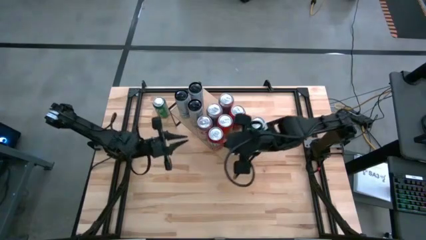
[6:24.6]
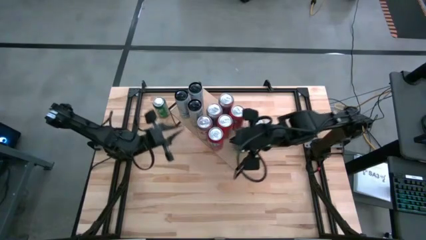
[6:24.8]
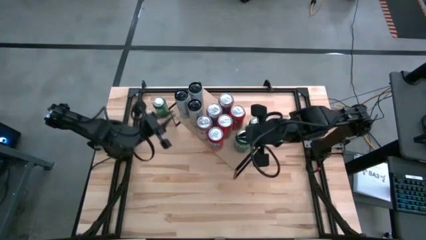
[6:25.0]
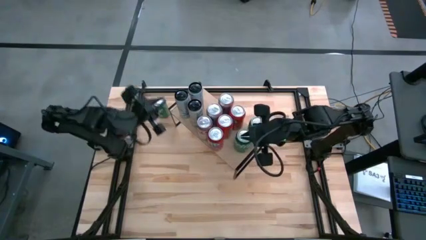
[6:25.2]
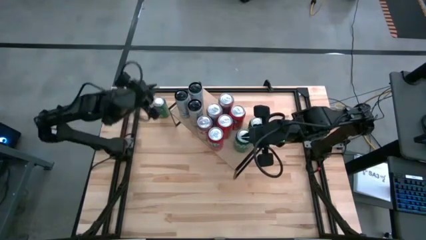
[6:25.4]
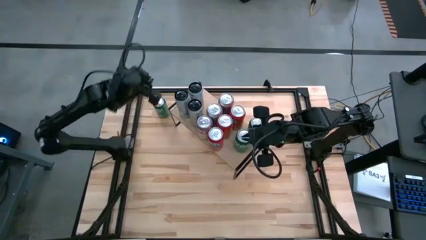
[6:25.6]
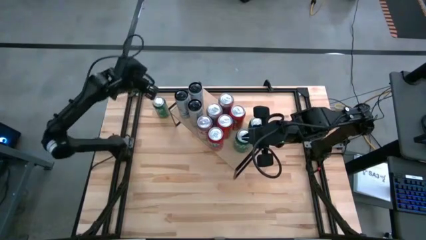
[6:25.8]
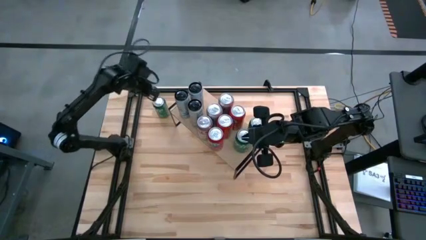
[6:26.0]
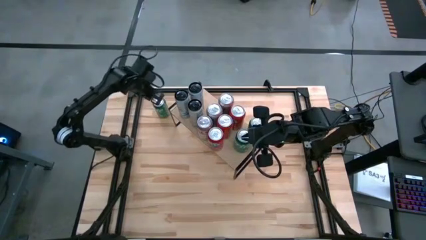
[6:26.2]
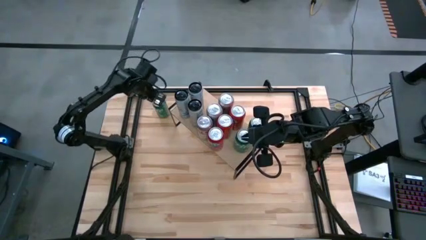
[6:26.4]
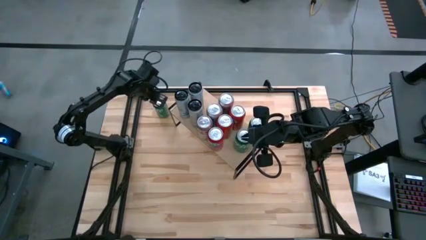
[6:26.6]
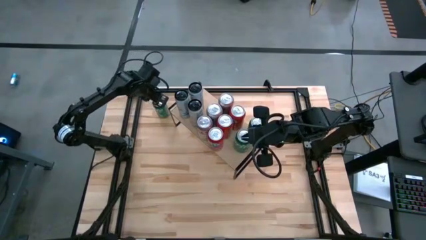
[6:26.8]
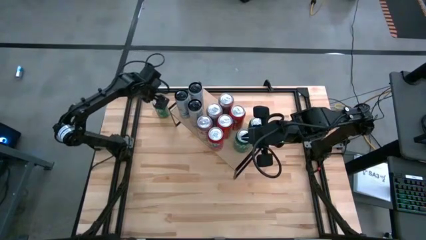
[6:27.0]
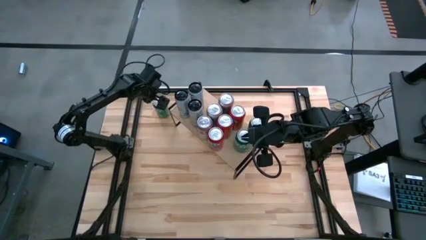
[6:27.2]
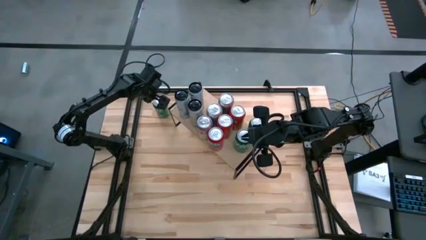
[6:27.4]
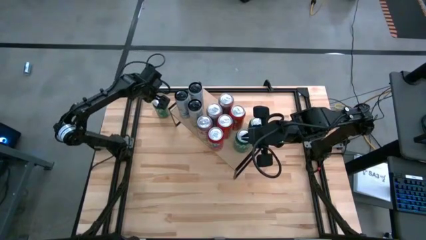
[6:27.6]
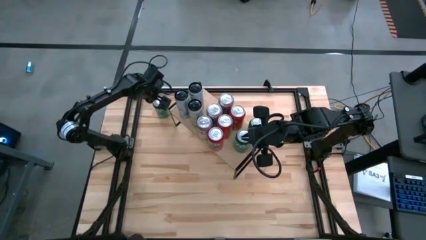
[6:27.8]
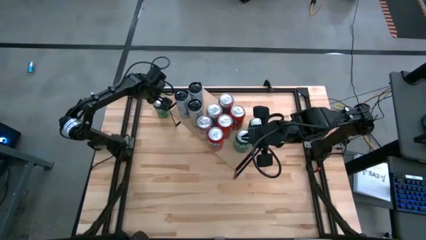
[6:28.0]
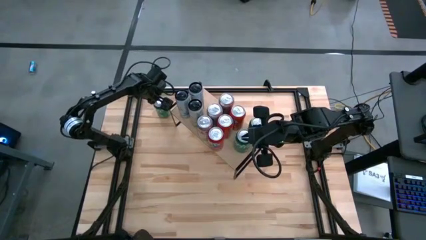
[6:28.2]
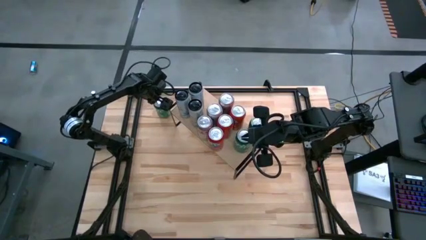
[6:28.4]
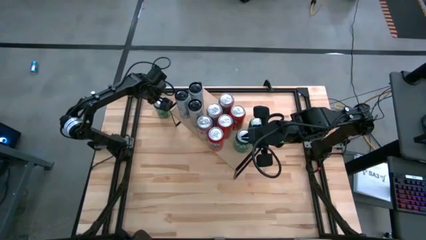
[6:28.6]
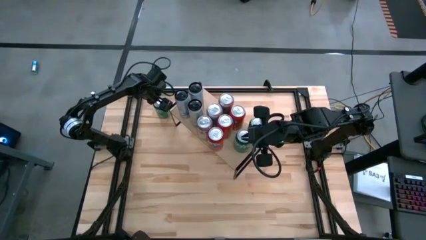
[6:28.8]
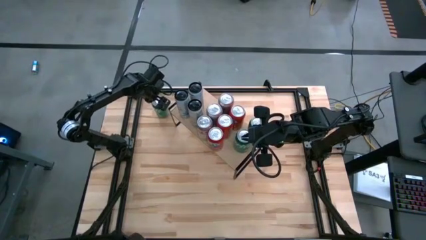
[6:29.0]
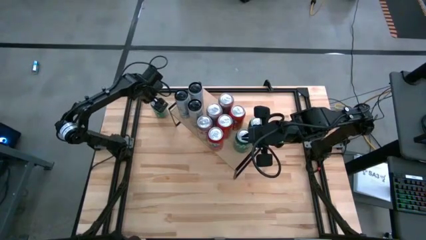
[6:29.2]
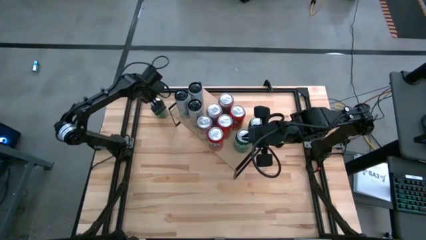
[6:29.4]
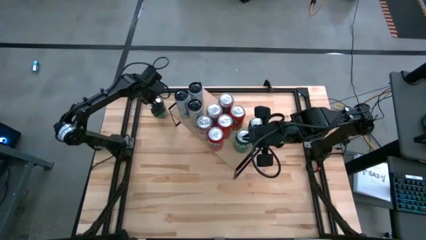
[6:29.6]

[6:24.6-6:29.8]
Task: Place canned beverage on shelf
Move the green soda can to the center of the table

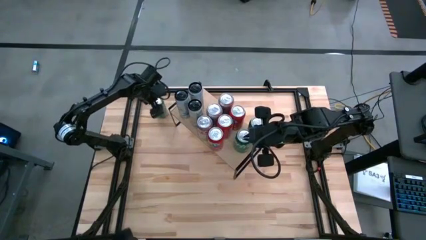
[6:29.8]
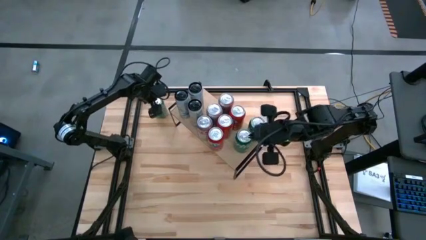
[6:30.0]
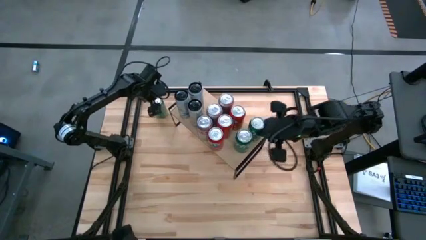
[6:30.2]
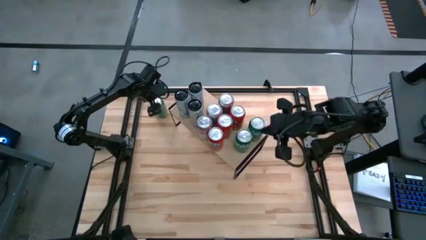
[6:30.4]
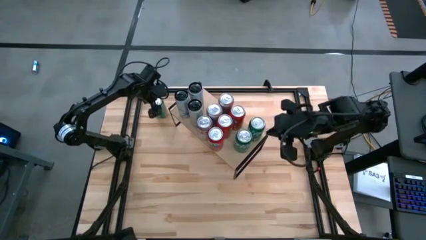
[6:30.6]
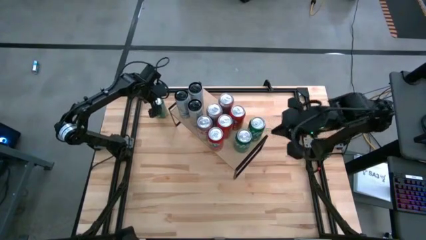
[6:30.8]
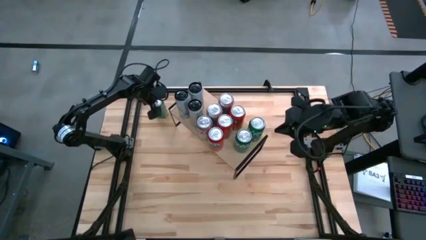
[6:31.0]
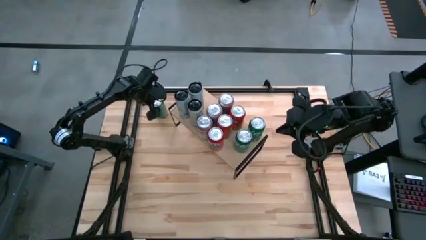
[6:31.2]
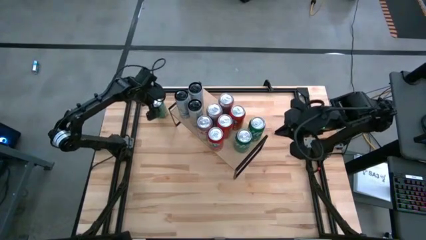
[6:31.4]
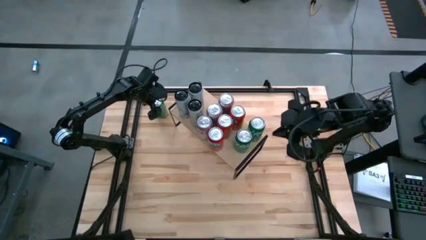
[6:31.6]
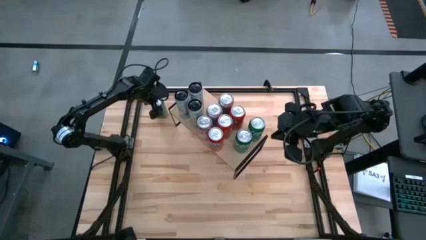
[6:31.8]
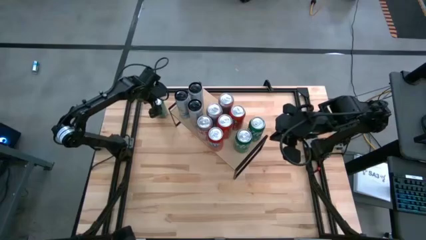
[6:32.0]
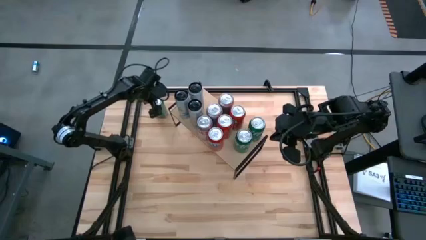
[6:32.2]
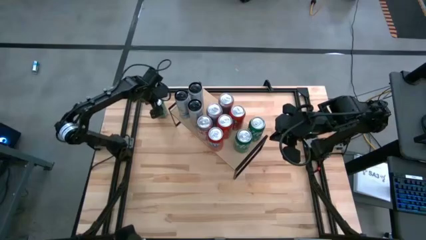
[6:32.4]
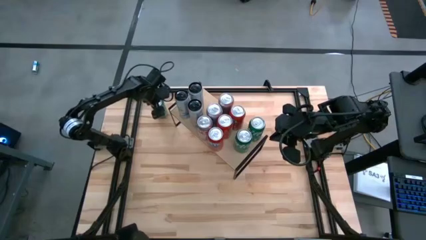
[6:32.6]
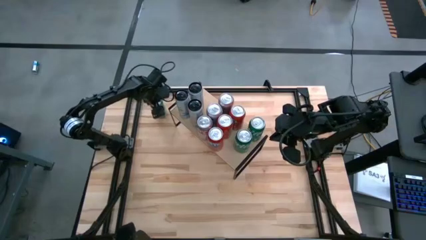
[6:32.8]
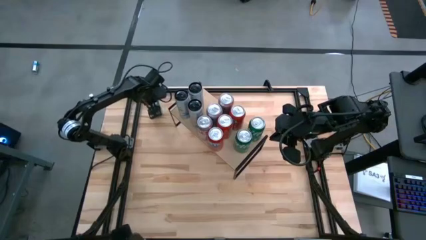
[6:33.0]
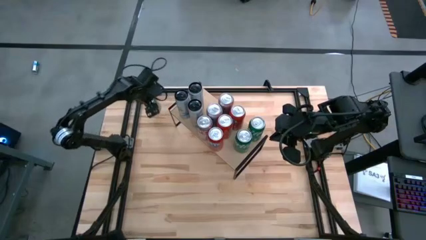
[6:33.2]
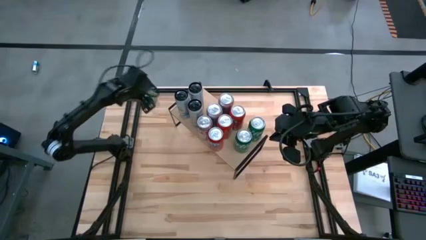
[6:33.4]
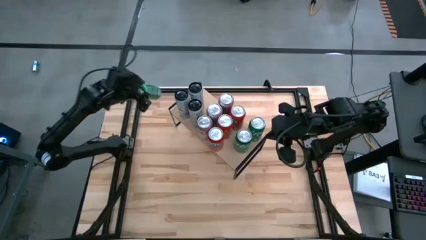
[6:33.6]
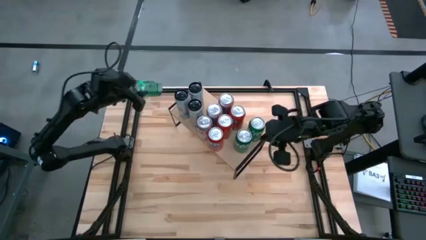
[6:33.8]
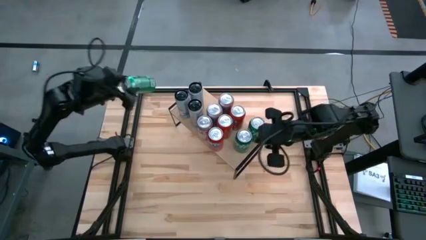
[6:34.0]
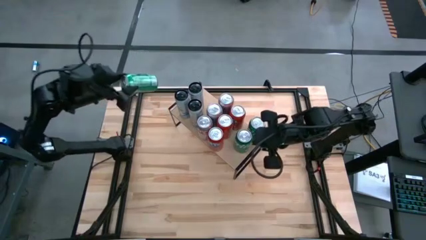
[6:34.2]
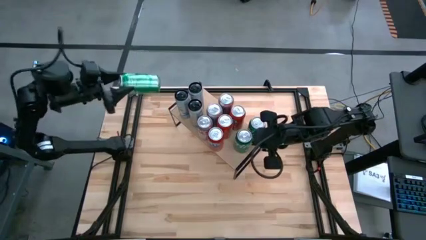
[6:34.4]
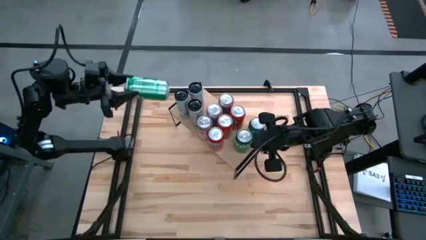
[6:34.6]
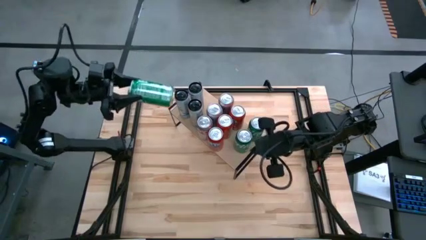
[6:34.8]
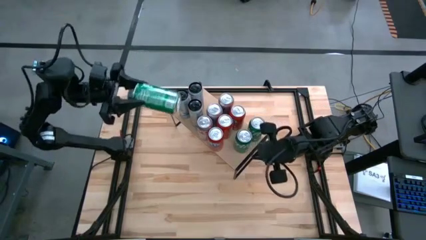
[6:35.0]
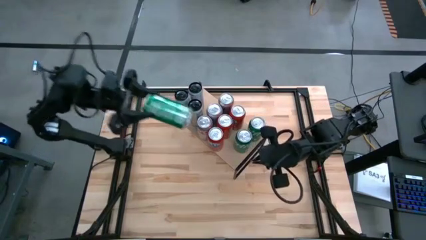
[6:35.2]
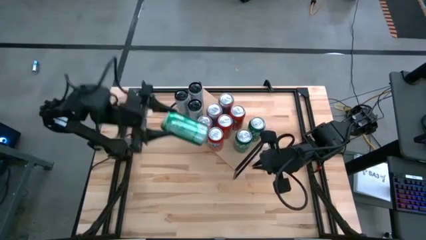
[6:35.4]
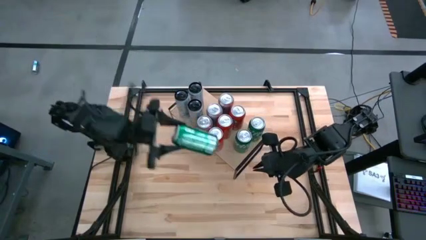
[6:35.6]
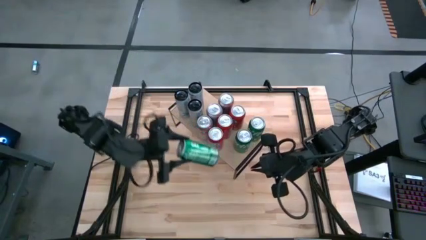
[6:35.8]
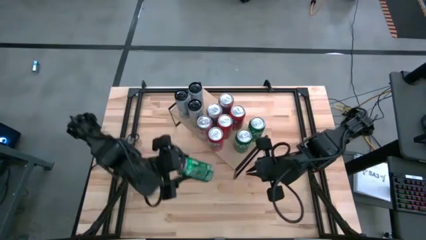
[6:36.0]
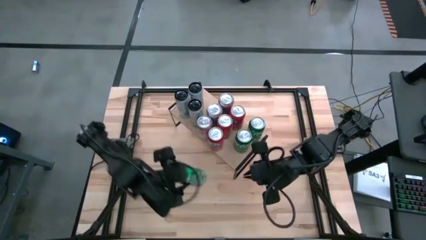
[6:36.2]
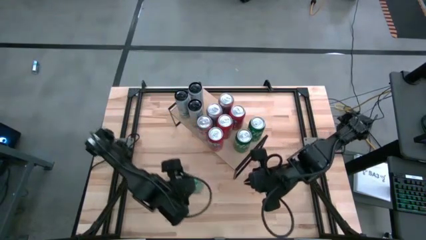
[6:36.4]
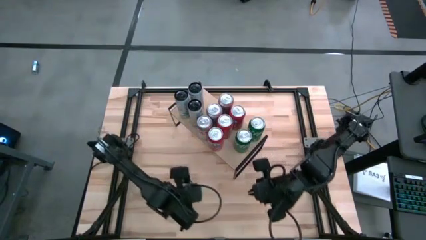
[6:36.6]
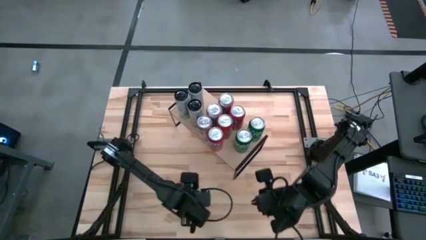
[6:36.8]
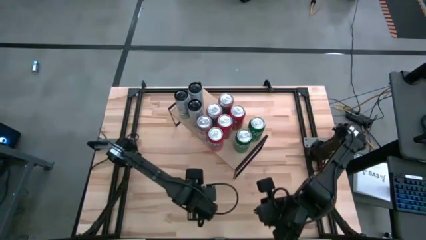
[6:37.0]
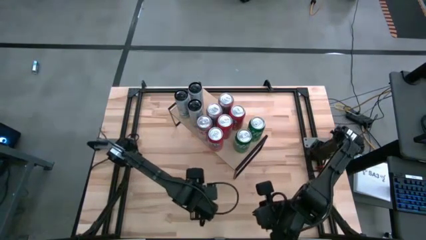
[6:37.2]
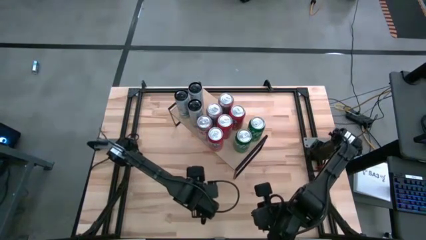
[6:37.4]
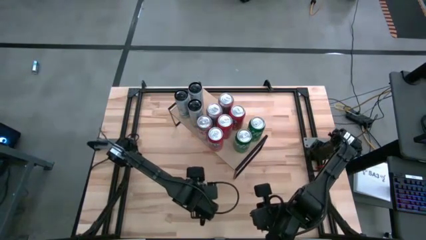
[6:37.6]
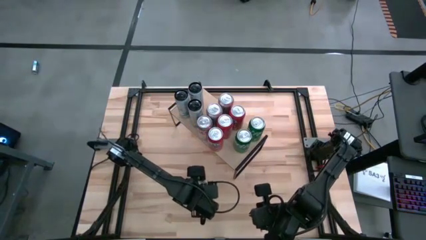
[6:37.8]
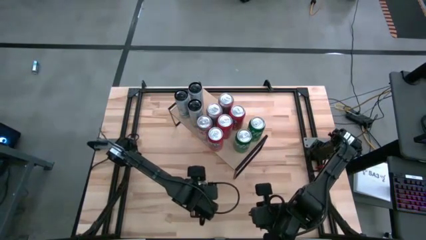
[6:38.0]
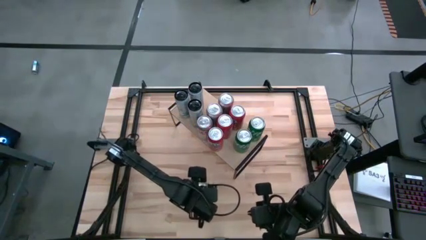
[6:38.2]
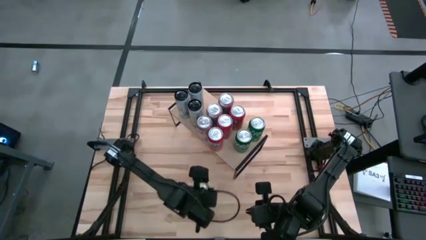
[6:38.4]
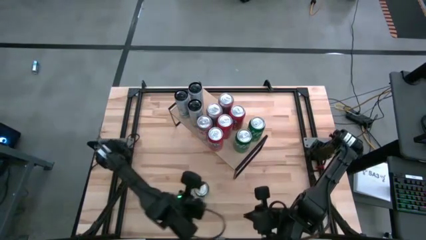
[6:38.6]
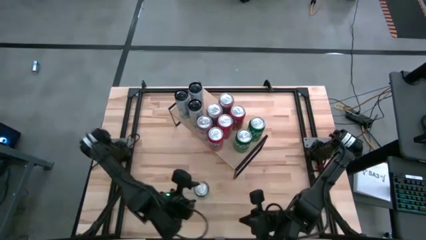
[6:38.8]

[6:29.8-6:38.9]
Move the green soda can to the center of the table

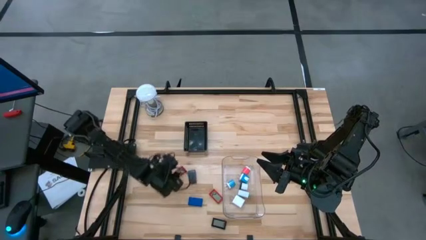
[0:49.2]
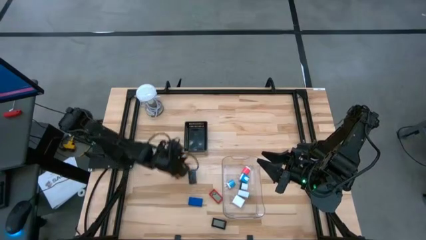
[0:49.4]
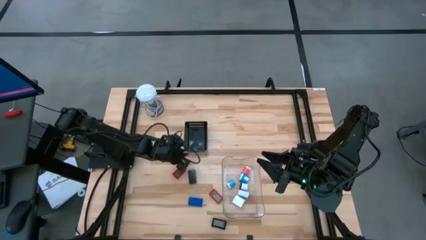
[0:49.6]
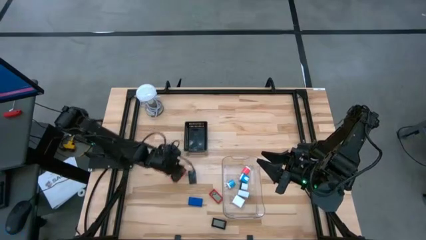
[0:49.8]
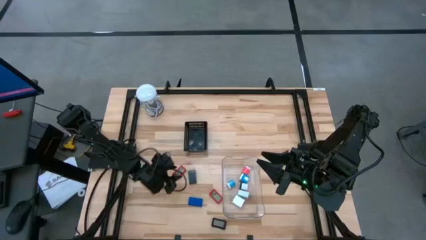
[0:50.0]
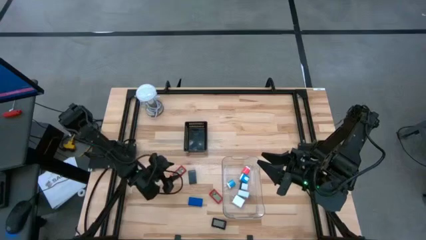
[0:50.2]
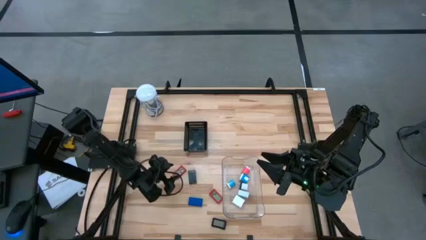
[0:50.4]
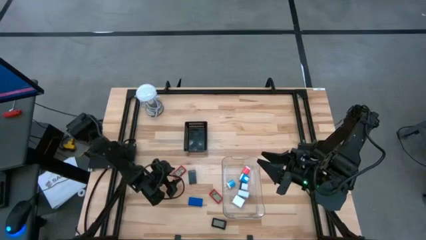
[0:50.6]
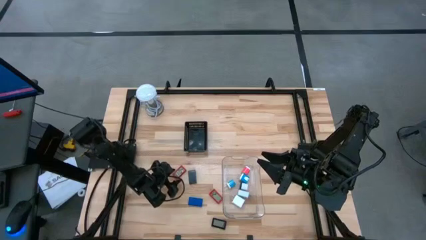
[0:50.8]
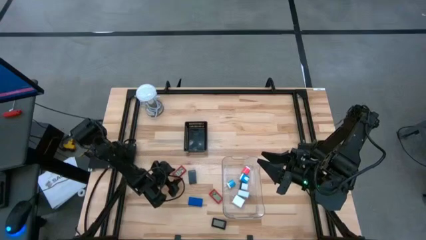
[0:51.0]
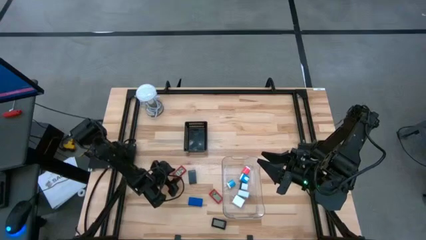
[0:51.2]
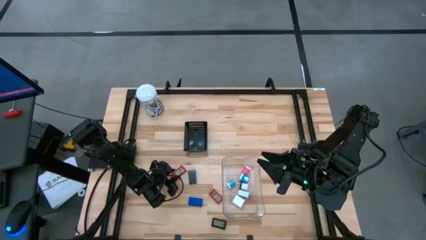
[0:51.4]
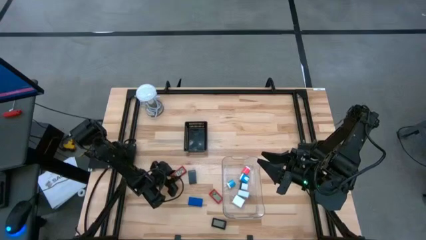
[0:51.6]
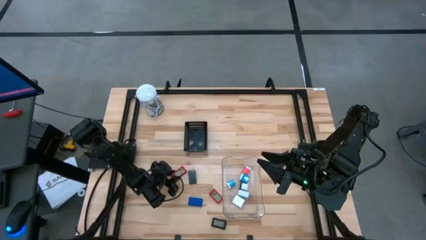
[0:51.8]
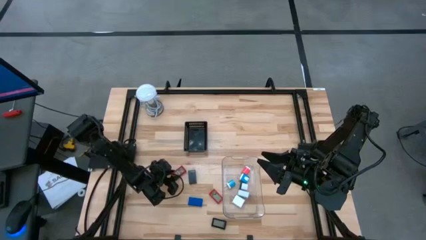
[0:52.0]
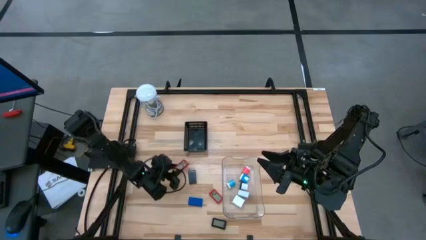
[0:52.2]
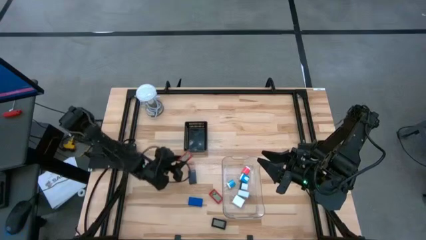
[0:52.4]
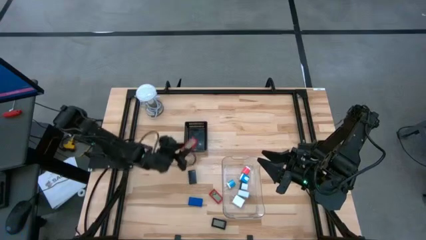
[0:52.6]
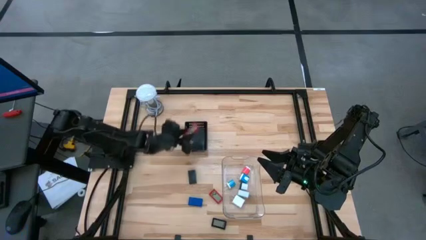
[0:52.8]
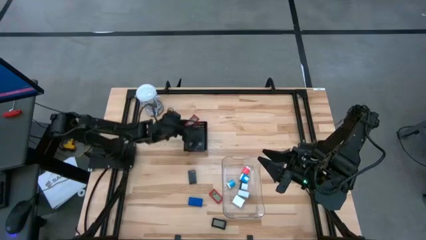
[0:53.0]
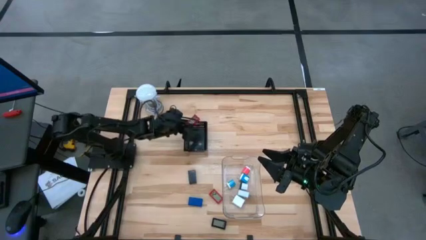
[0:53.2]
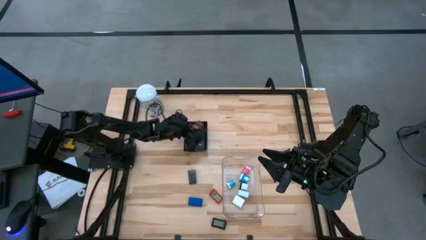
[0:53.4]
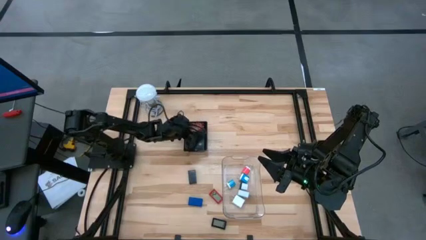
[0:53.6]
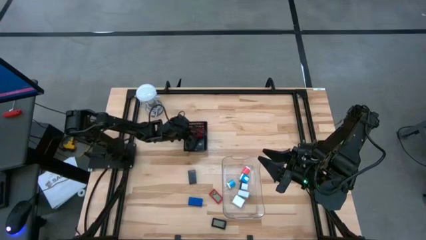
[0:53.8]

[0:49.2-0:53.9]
Task: Pick & Place Office items
Put the top red digital clock into the black bin
